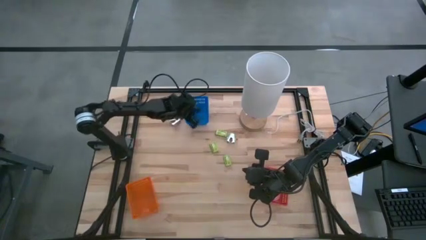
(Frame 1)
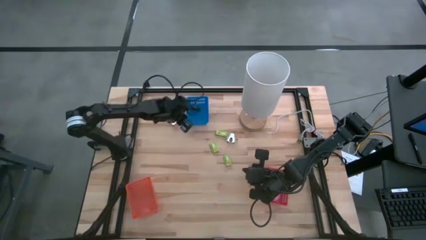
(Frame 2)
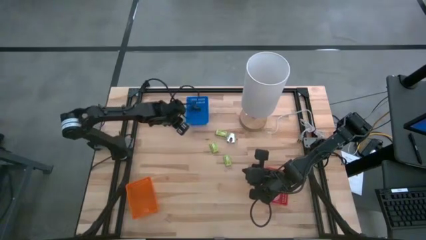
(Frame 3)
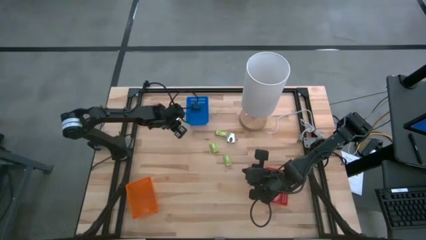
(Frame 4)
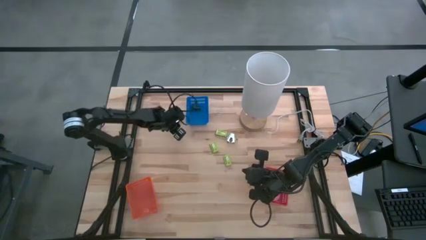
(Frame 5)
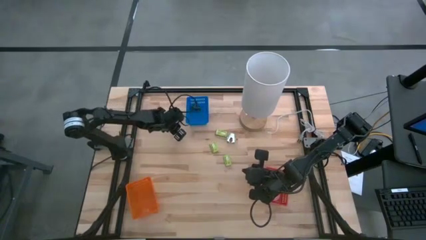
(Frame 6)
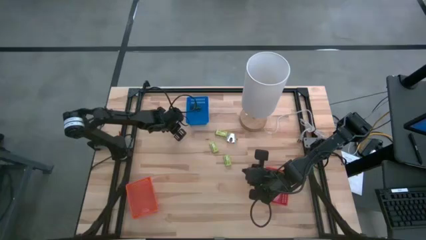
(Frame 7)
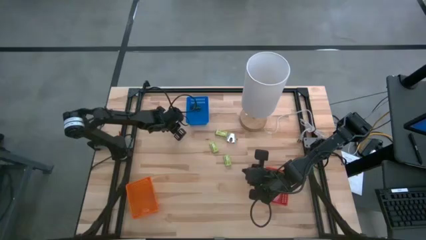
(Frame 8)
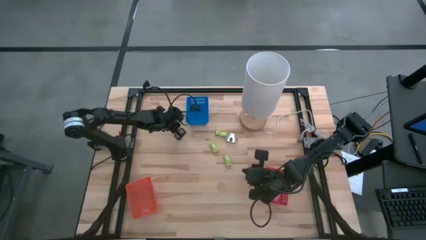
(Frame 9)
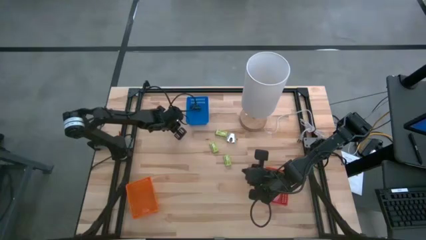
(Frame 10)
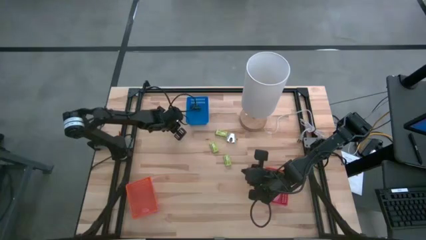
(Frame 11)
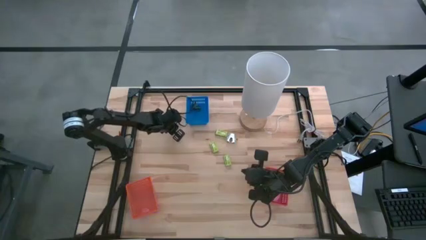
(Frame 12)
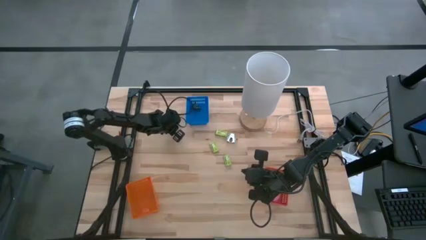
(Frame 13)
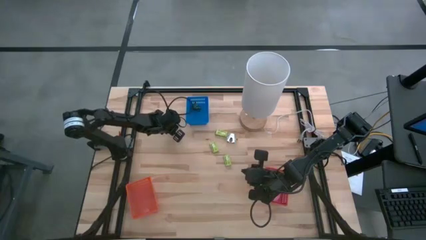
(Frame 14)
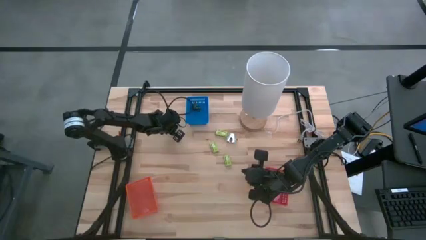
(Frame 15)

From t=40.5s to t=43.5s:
Task: Pick and place Stapler, Stapler remover, tape
Put the purple staple remover into the blue bin

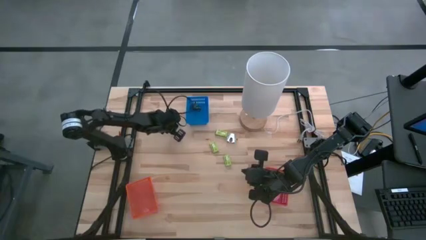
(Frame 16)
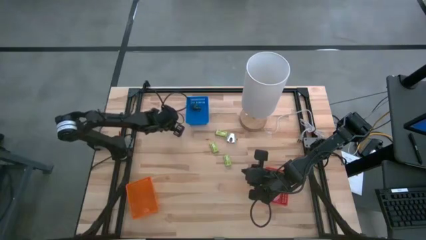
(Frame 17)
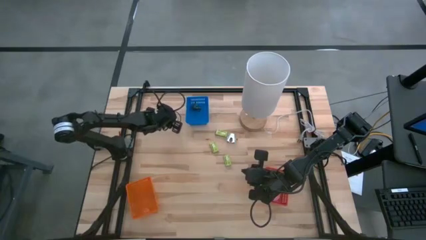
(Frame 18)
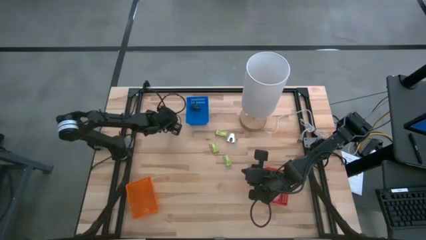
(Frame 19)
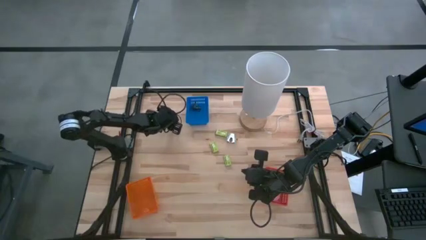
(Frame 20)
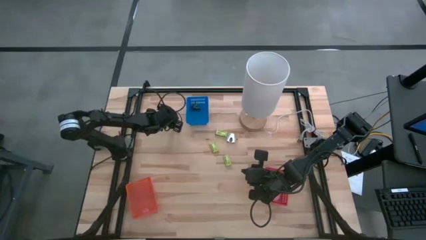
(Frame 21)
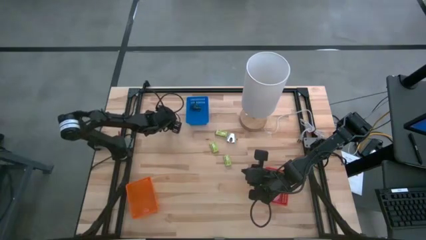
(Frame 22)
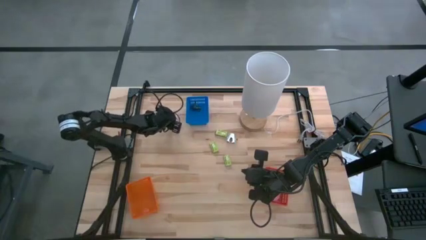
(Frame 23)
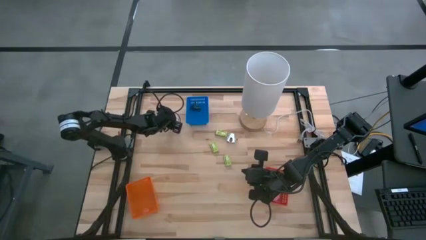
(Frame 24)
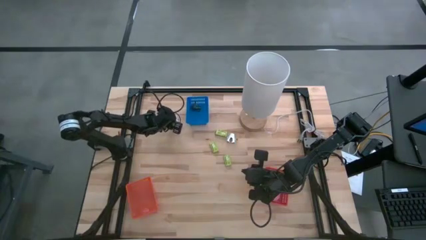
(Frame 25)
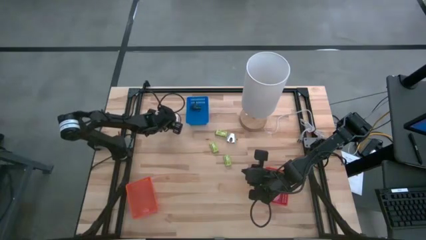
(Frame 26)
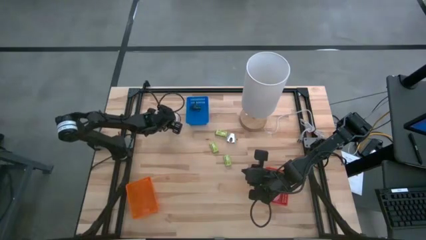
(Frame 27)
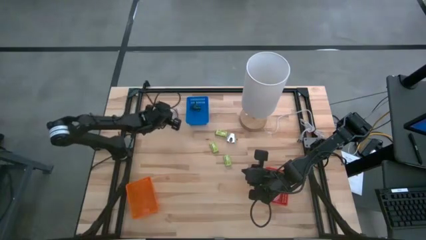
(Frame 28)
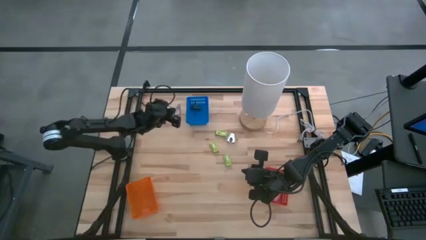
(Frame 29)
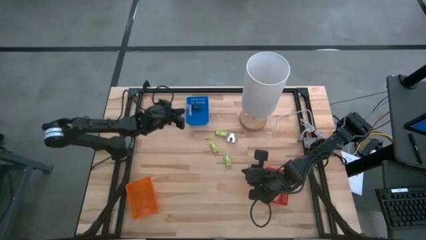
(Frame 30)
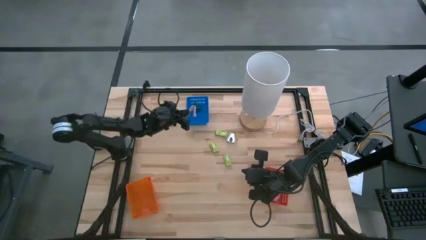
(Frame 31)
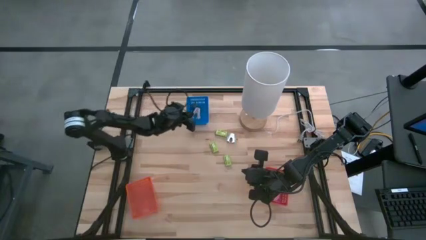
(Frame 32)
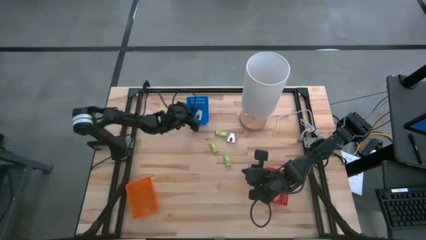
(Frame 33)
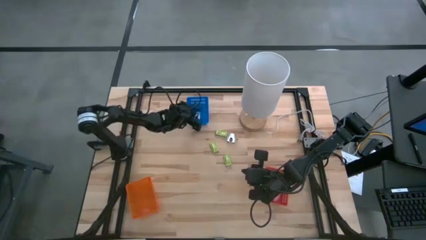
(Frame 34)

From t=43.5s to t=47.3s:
Put the purple staple remover into the blue bin

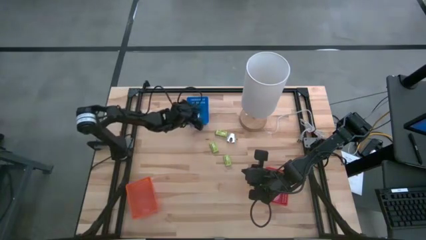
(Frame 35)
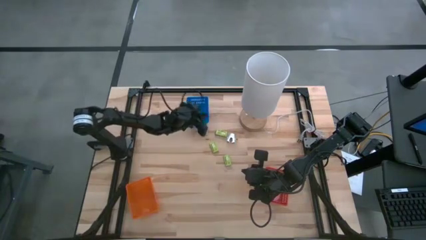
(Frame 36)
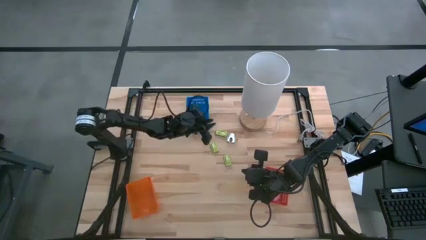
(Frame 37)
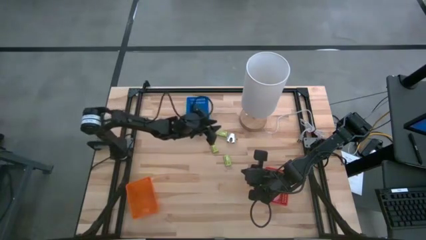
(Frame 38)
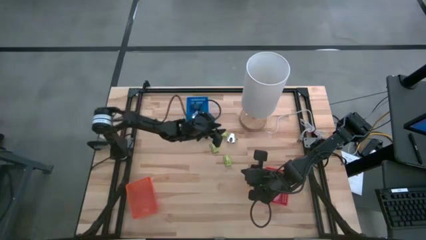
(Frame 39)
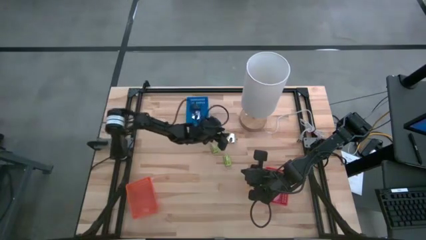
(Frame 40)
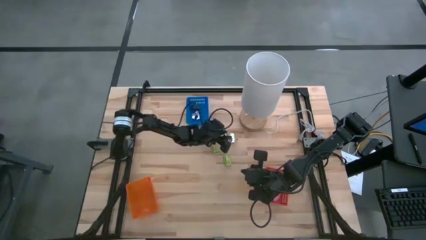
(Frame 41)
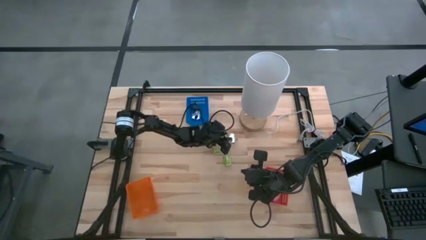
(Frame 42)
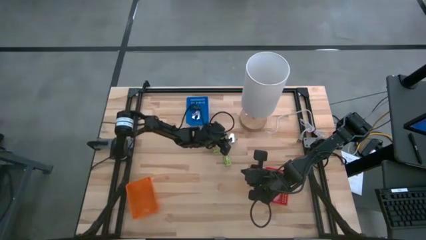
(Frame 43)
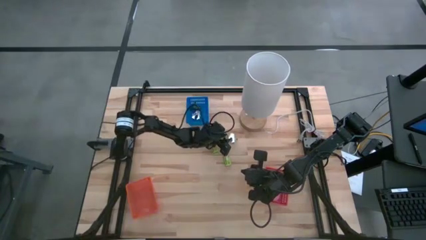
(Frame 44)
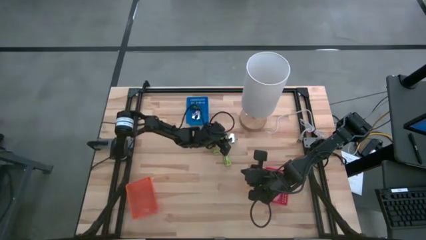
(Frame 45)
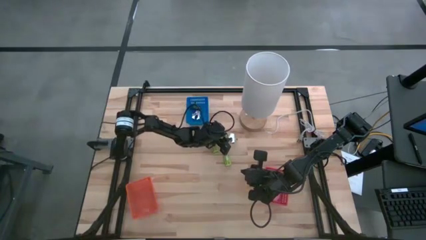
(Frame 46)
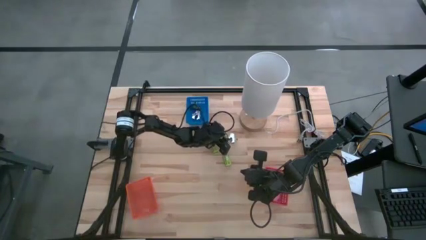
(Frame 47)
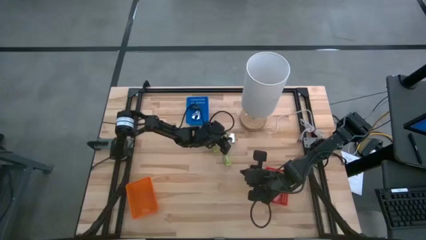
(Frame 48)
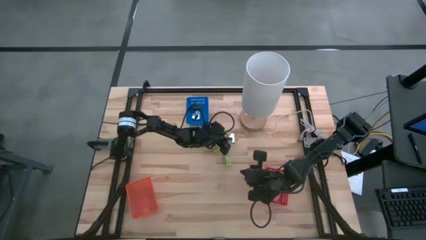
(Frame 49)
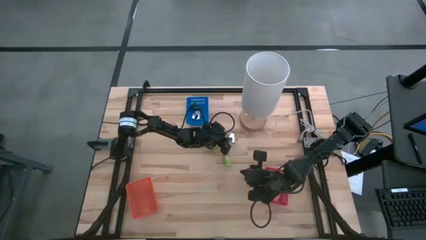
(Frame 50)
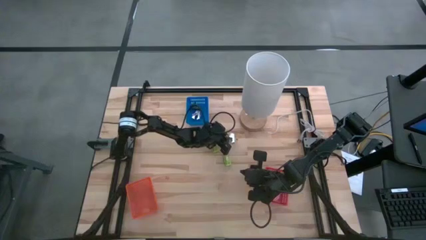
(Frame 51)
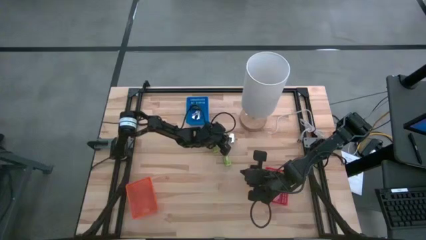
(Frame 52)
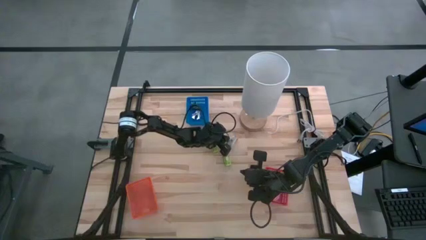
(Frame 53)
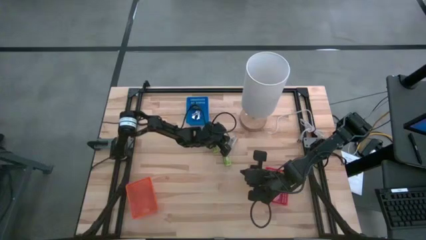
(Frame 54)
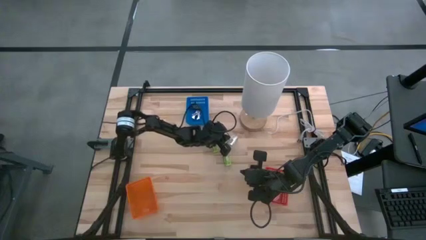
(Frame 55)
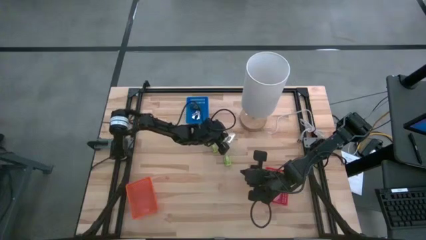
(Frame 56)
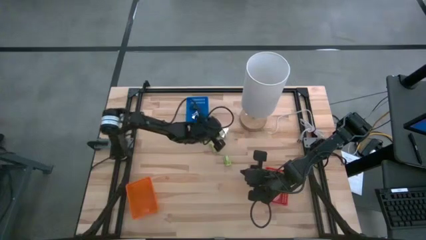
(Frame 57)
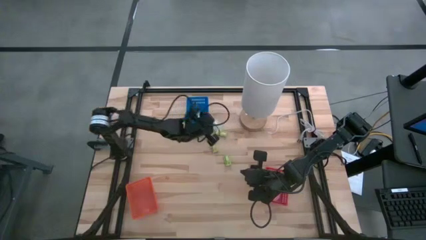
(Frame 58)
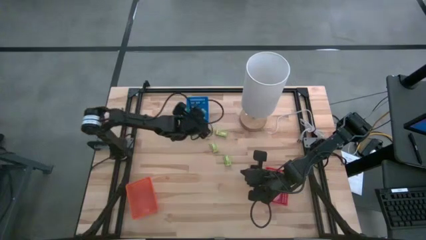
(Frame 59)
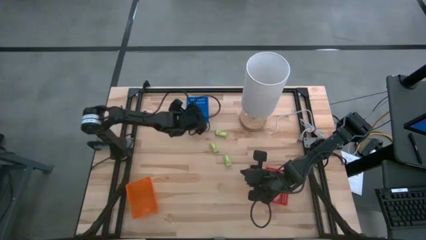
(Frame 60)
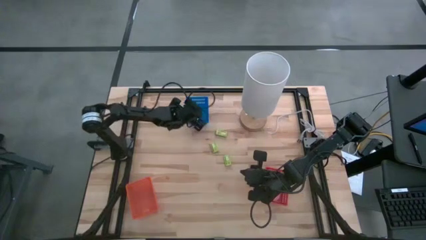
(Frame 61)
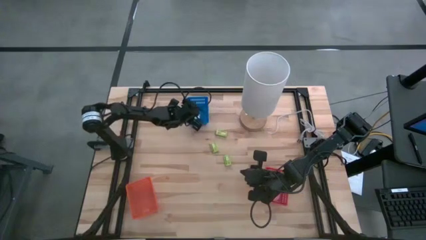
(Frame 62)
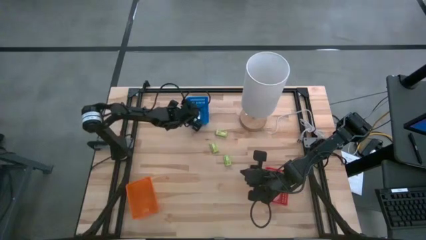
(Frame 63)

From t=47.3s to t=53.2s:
Put the blue staple remover into the blue bin
